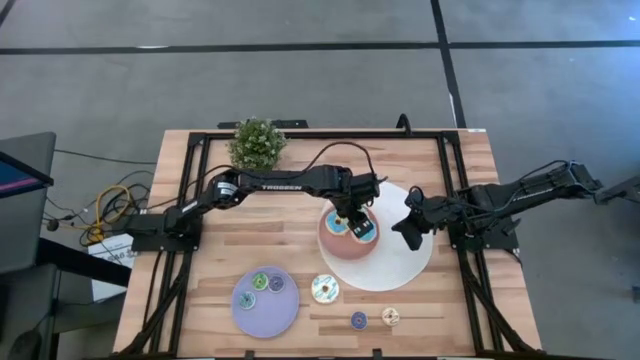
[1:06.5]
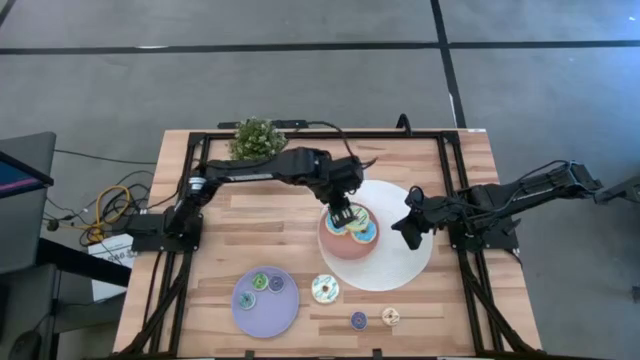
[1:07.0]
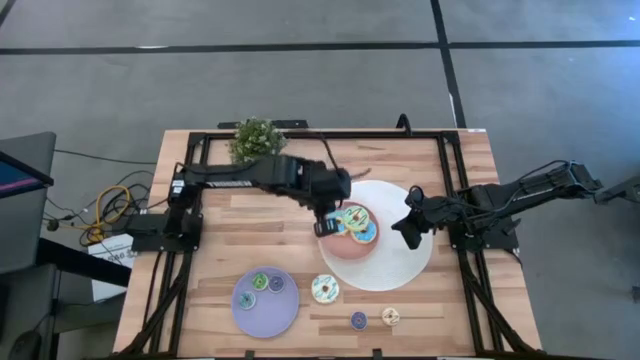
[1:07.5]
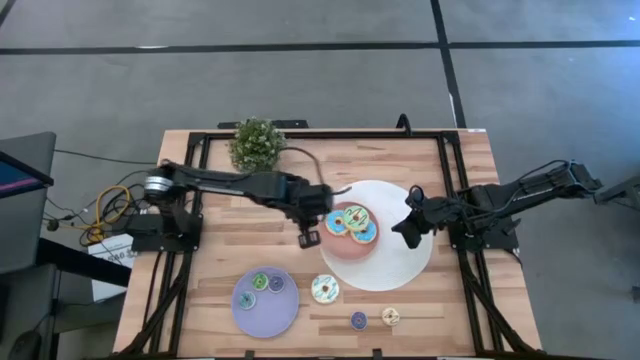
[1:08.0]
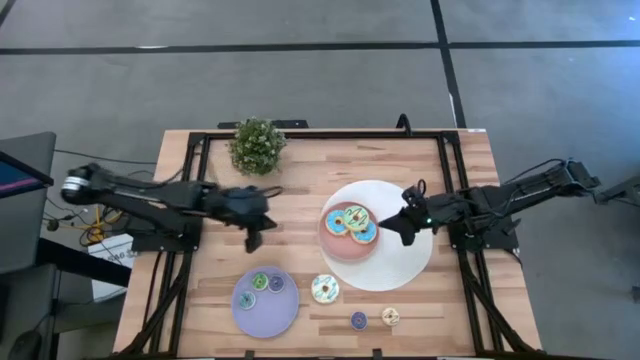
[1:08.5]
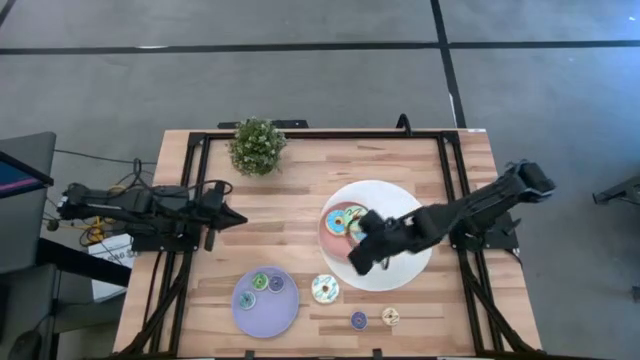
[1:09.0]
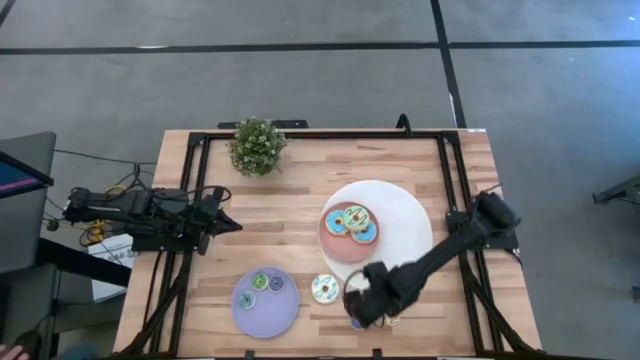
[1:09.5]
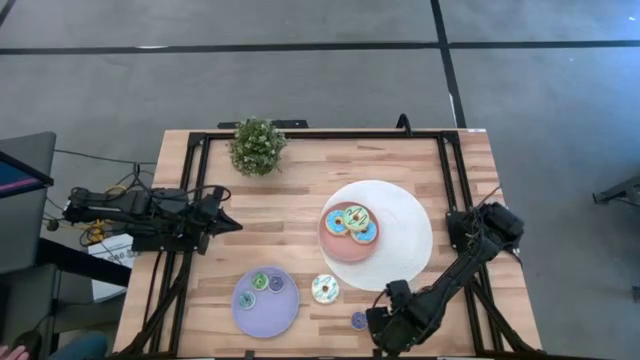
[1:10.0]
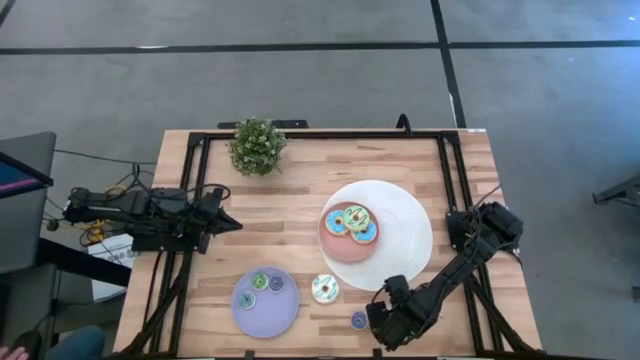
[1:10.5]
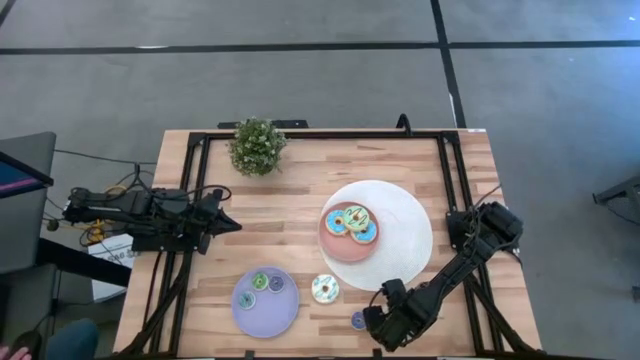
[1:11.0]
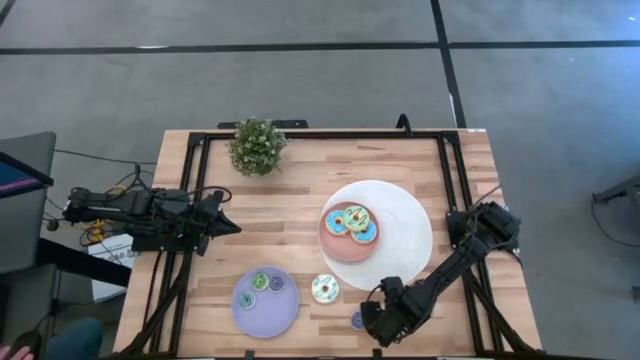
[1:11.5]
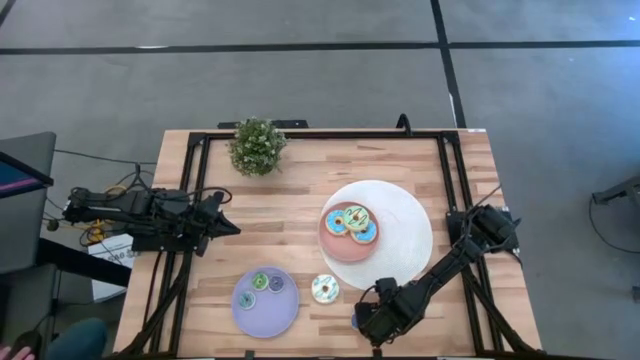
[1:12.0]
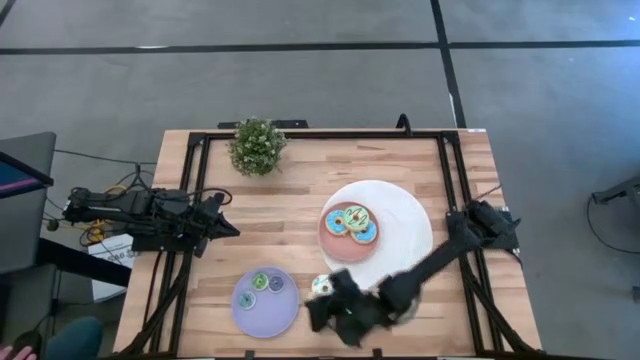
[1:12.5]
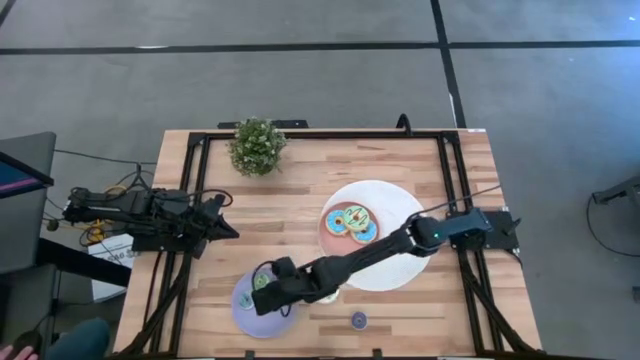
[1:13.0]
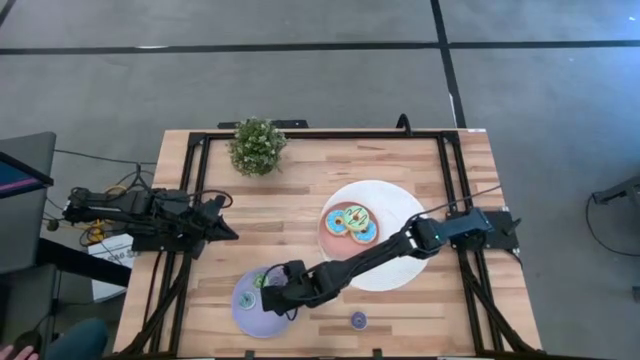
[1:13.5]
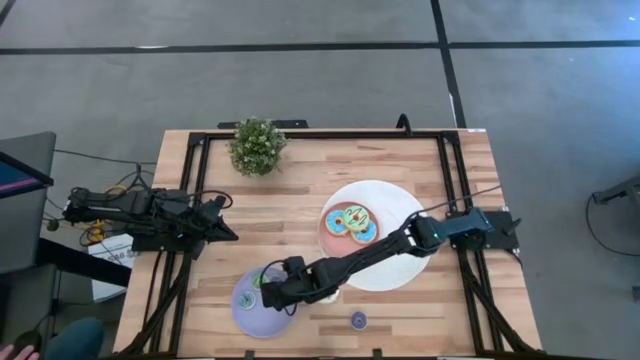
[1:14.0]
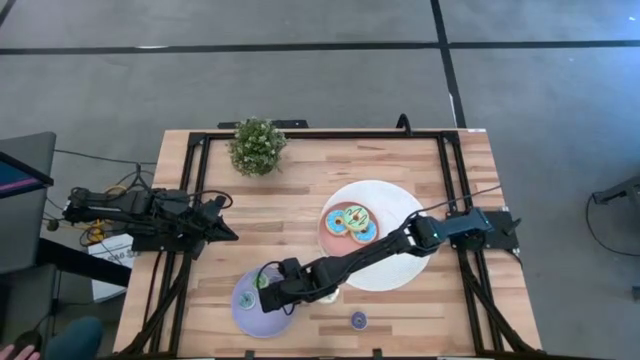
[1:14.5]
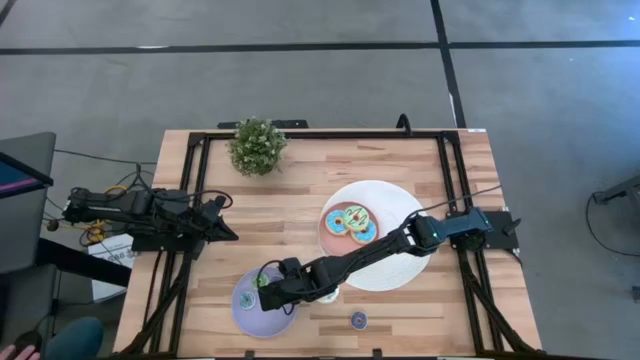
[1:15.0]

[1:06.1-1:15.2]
Task: Pick & Place donuts
Put the small white donut on the purple plate

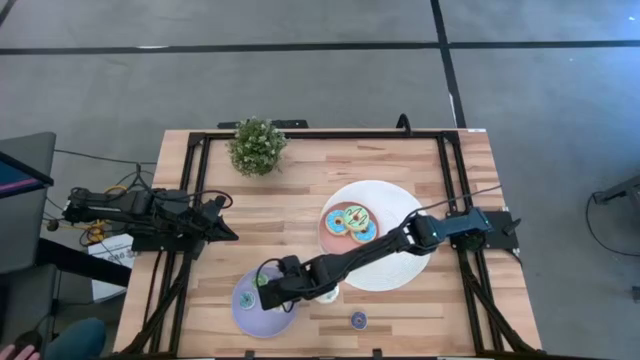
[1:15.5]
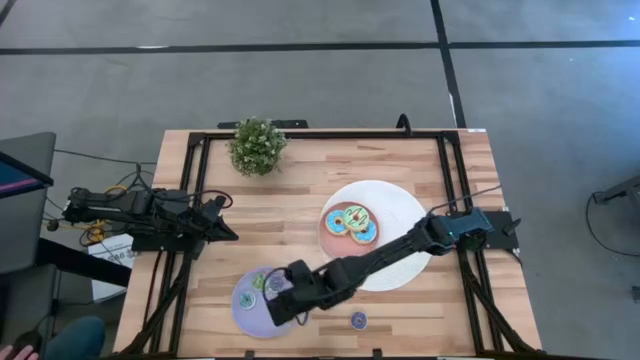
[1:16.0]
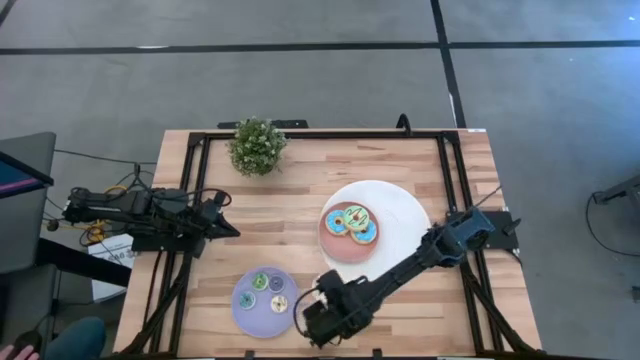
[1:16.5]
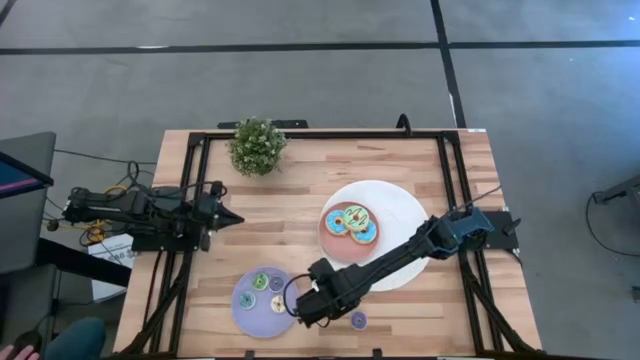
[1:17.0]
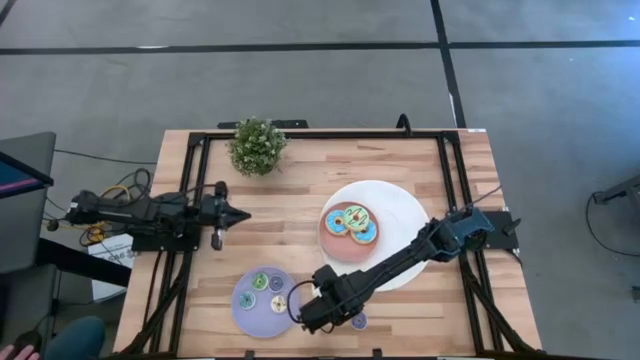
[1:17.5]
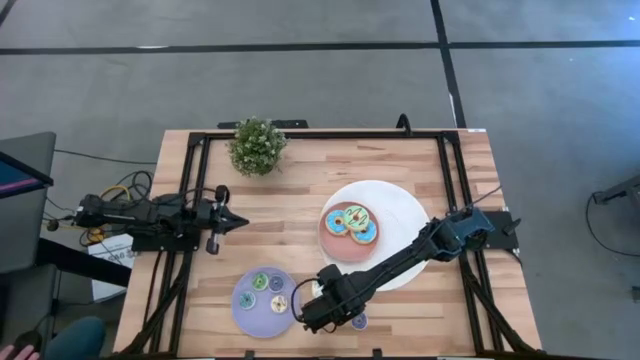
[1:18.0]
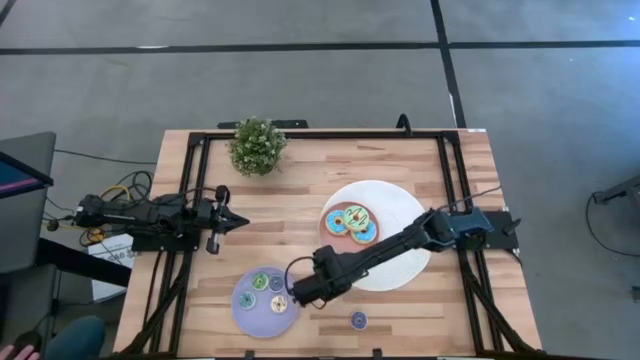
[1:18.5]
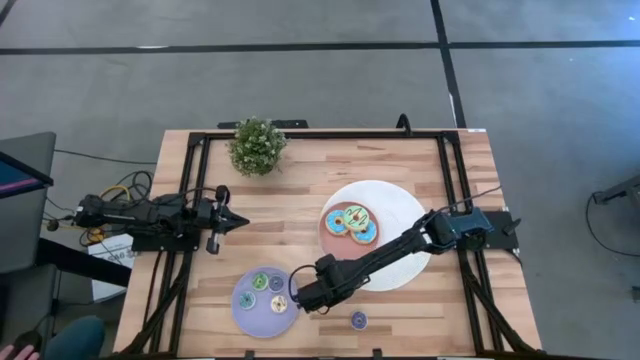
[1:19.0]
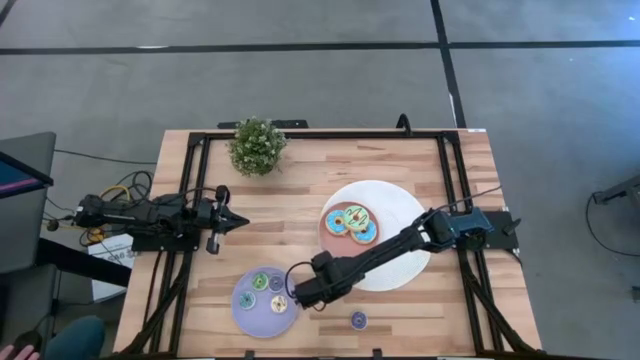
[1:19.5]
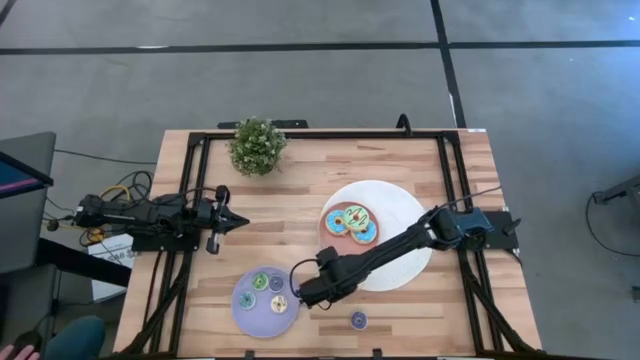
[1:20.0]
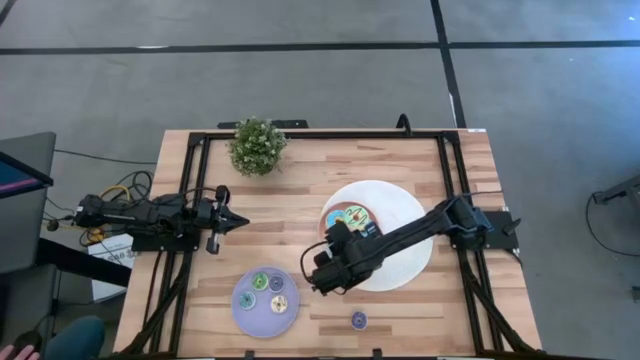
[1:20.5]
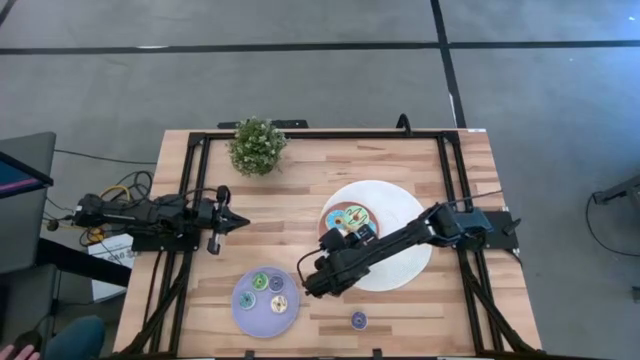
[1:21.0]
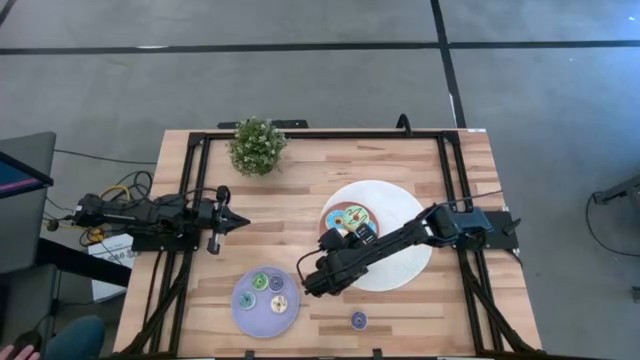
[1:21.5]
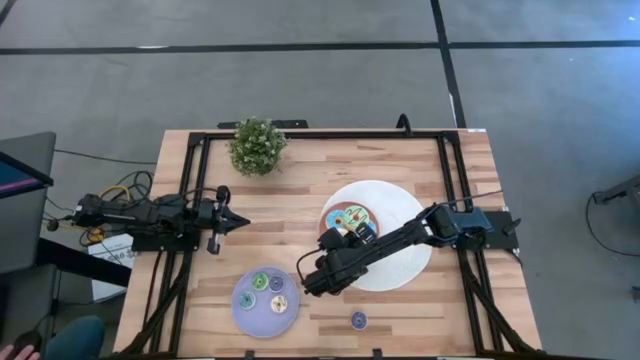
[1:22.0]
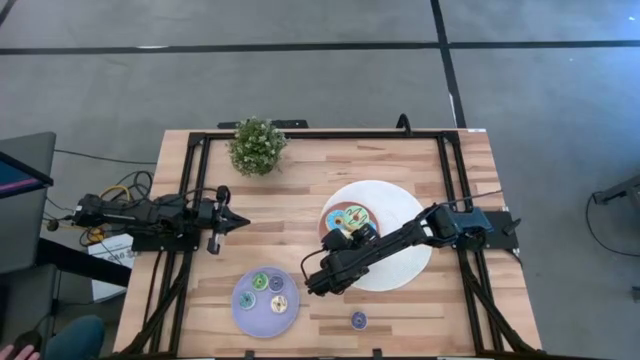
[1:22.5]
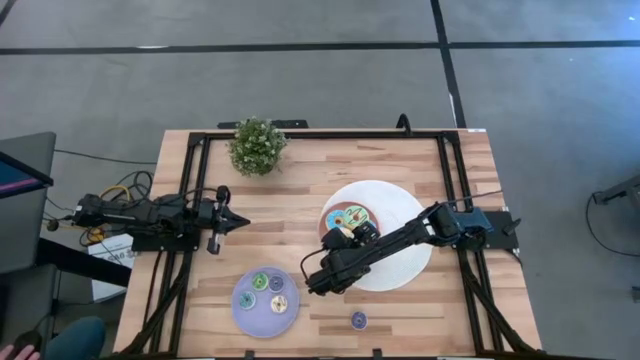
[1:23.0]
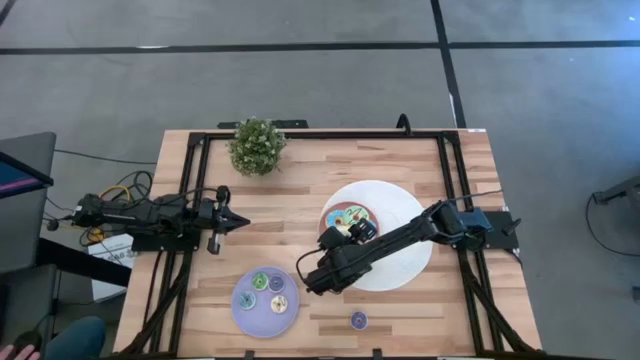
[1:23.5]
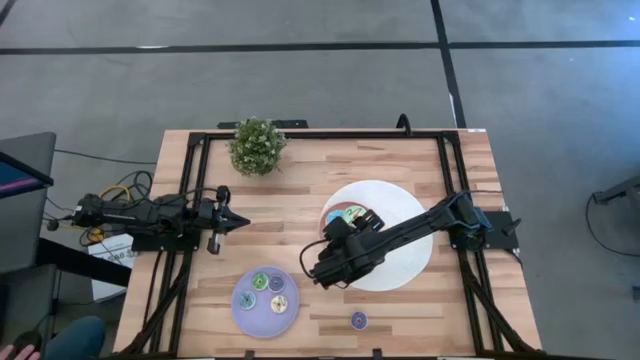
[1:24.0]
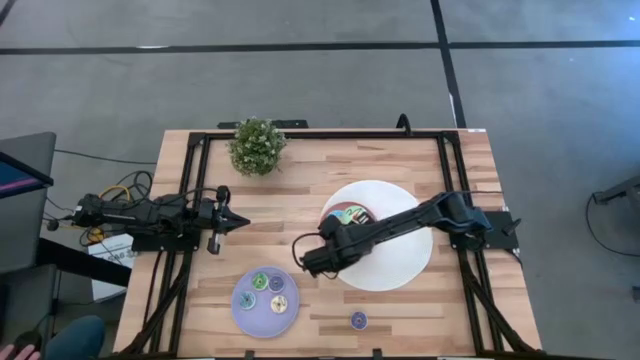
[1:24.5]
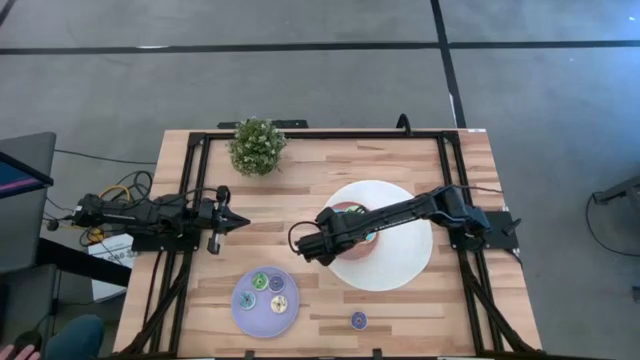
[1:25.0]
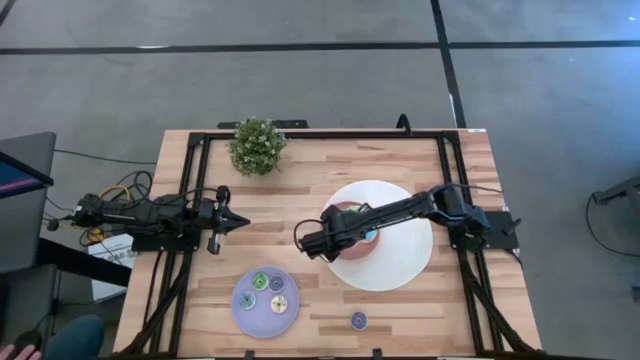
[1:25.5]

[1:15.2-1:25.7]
Put the large white donut on the light pink plate

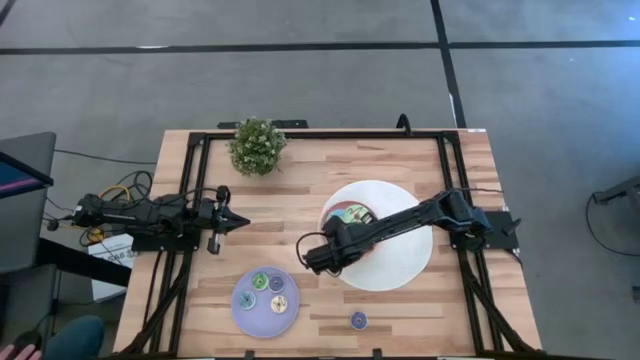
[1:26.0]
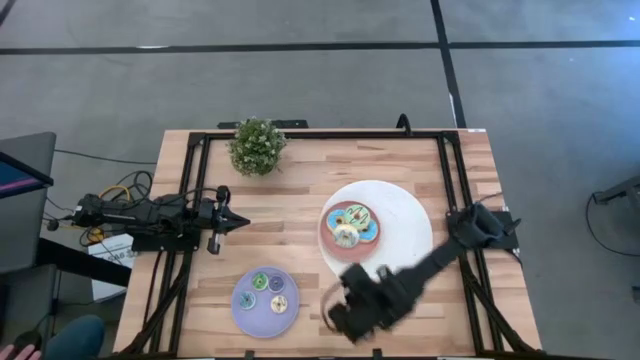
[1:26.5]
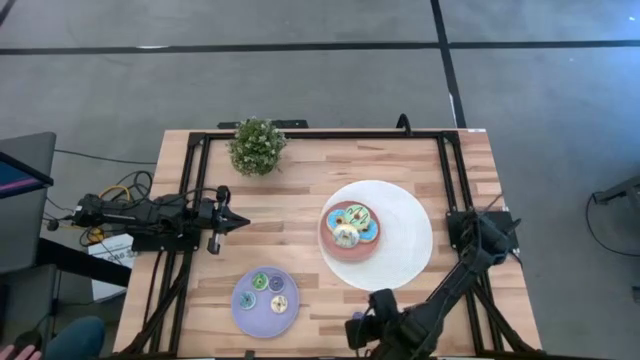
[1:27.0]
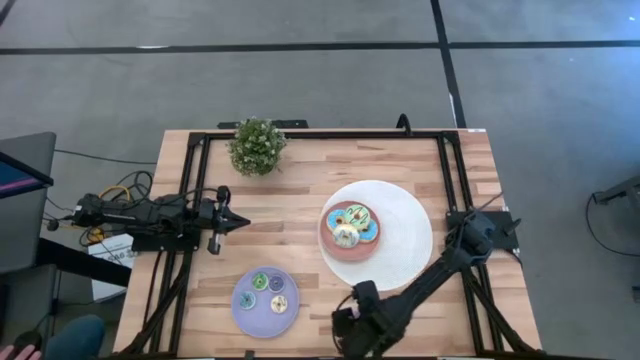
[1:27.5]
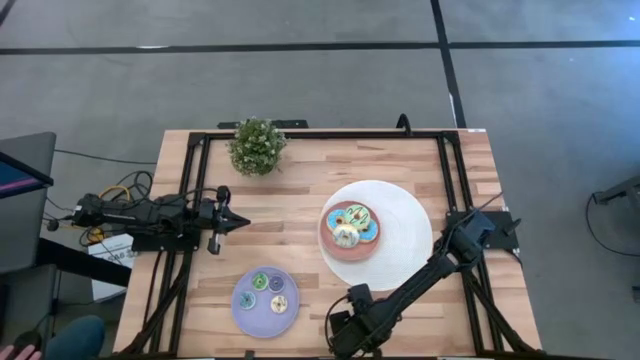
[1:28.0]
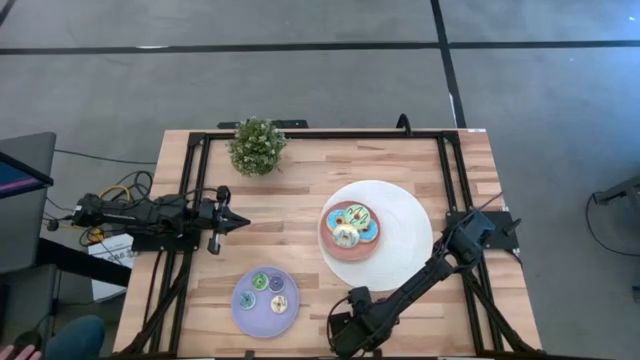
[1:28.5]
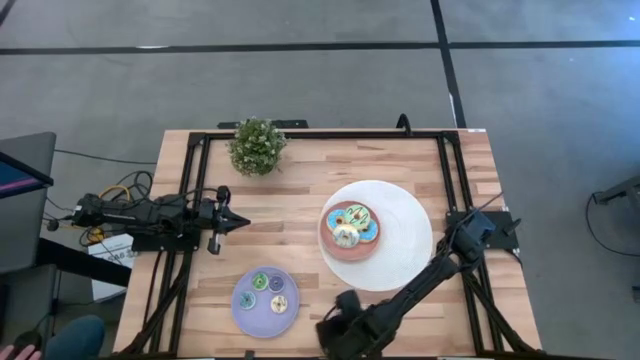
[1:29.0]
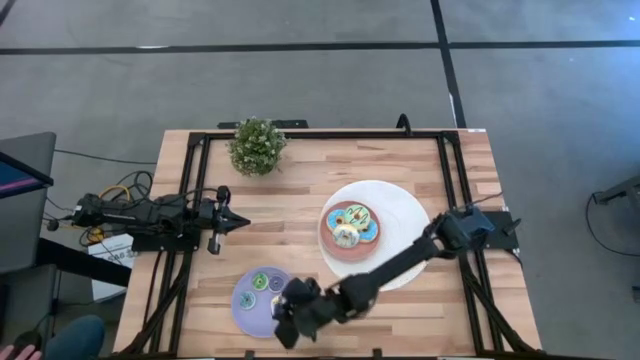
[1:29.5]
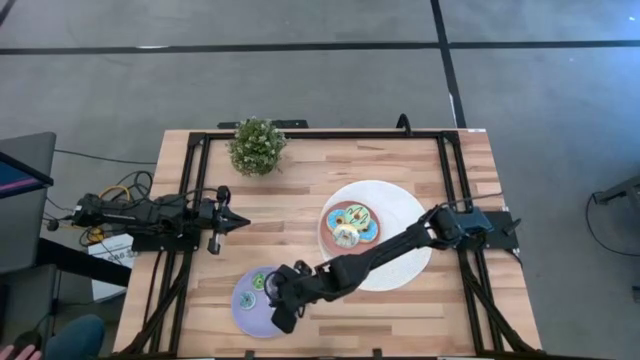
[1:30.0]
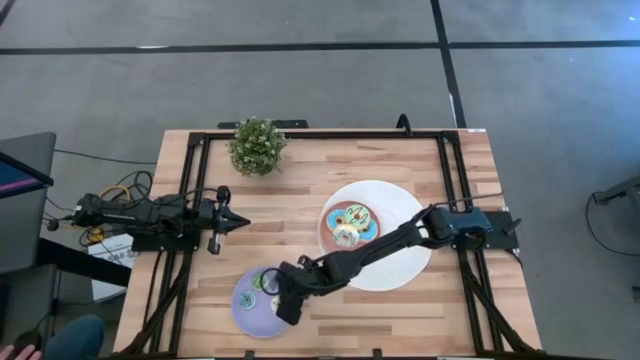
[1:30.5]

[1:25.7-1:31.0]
Put the small blue donut on the purple plate
